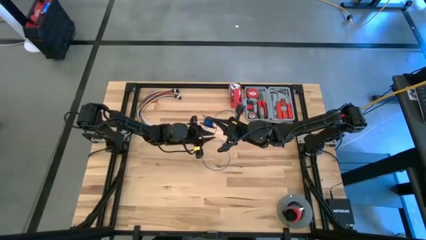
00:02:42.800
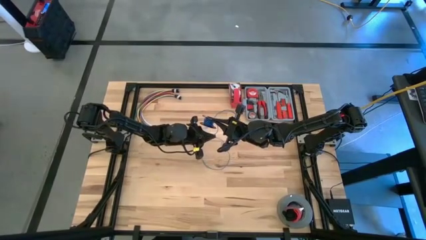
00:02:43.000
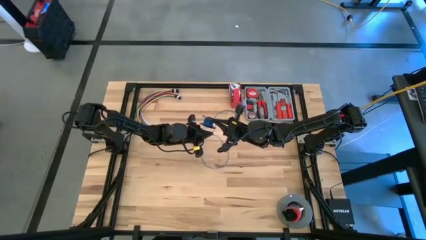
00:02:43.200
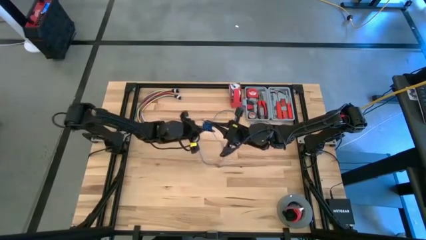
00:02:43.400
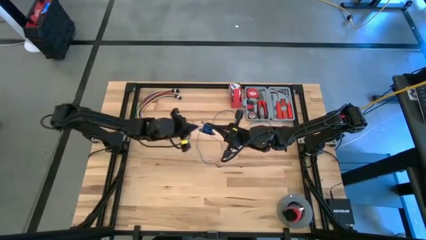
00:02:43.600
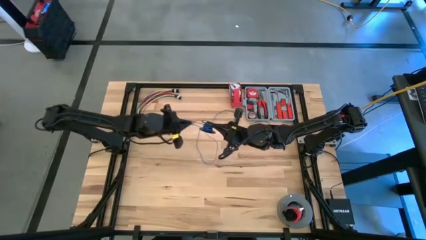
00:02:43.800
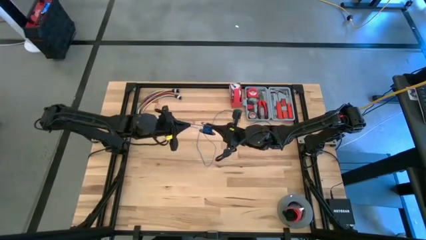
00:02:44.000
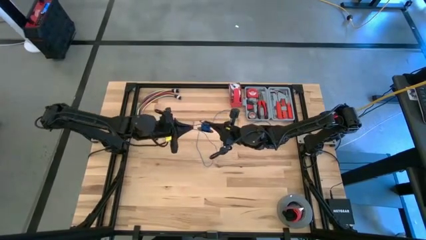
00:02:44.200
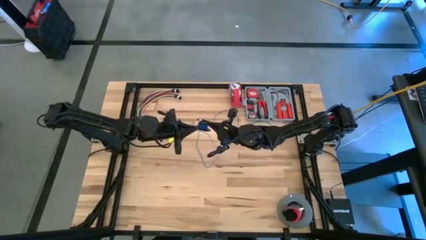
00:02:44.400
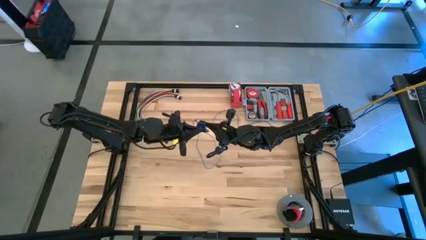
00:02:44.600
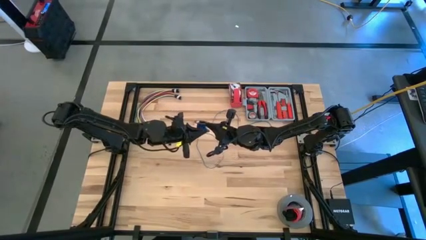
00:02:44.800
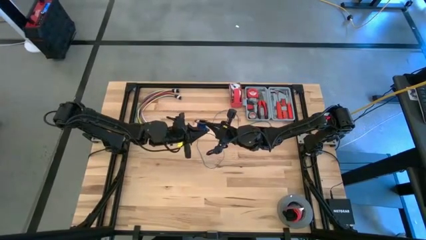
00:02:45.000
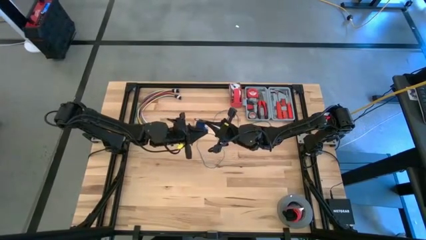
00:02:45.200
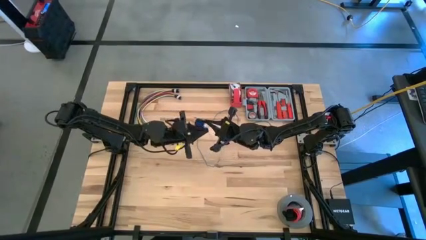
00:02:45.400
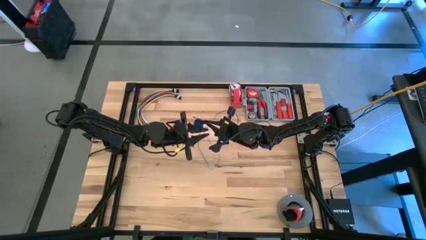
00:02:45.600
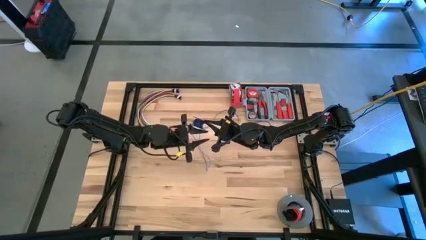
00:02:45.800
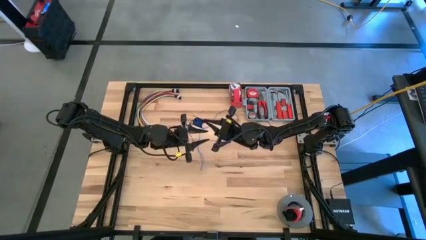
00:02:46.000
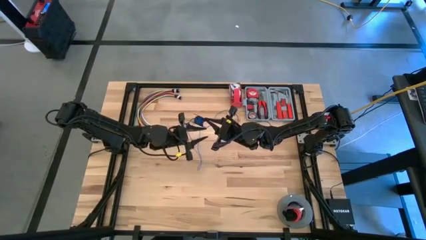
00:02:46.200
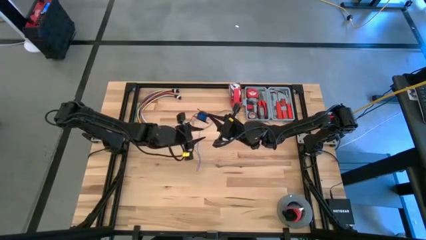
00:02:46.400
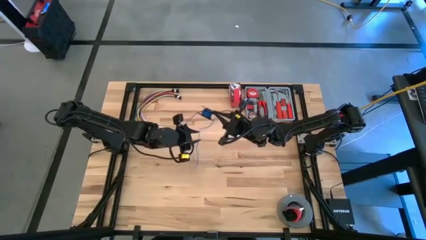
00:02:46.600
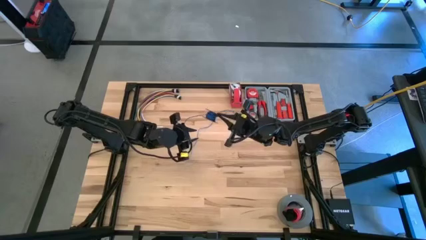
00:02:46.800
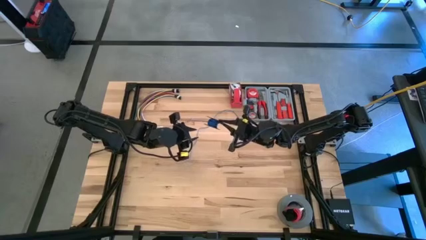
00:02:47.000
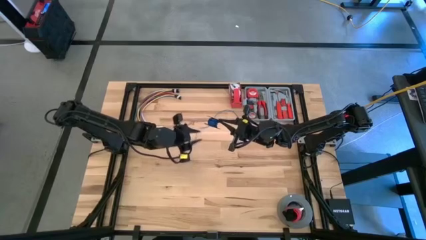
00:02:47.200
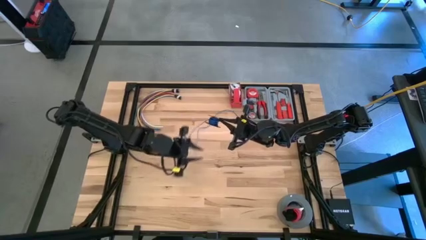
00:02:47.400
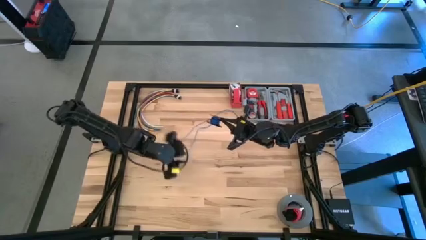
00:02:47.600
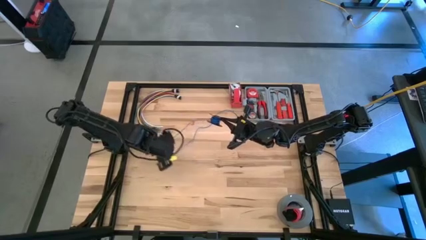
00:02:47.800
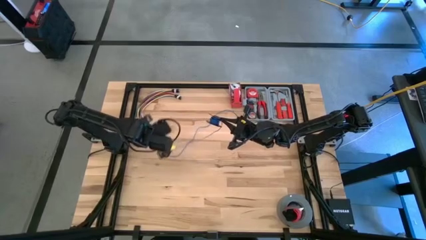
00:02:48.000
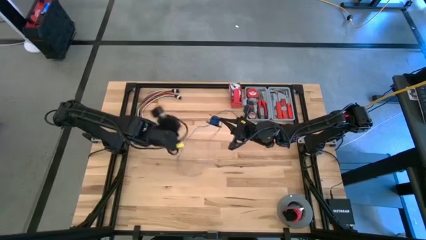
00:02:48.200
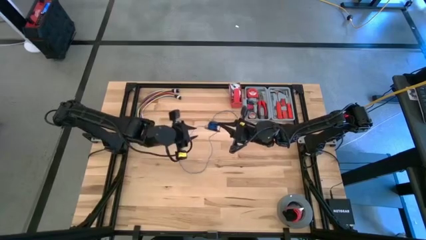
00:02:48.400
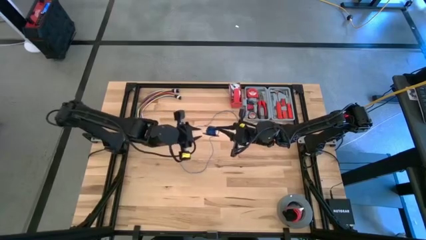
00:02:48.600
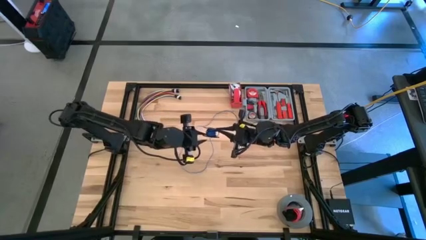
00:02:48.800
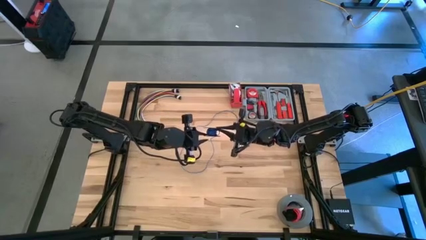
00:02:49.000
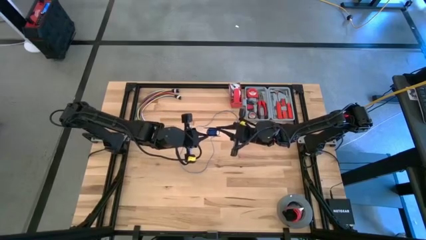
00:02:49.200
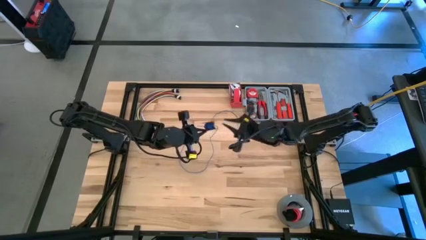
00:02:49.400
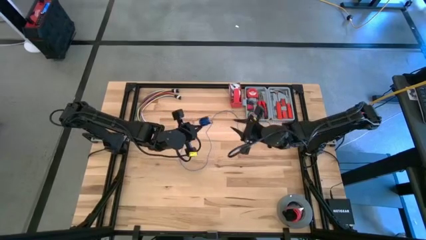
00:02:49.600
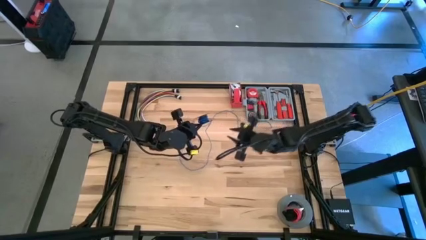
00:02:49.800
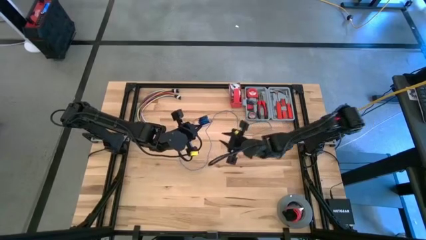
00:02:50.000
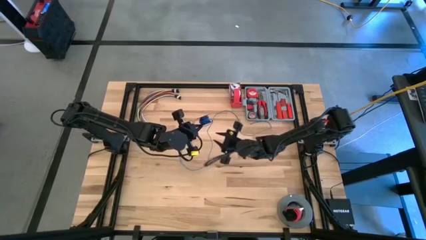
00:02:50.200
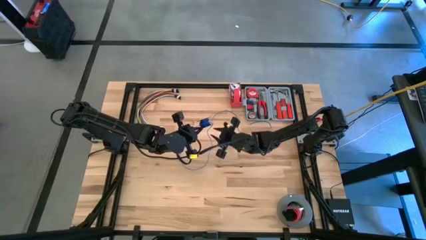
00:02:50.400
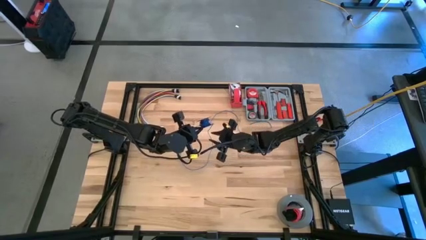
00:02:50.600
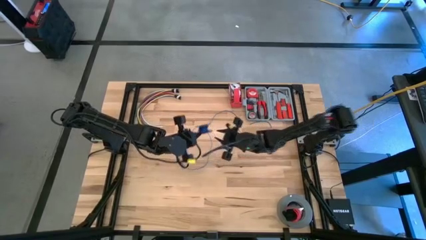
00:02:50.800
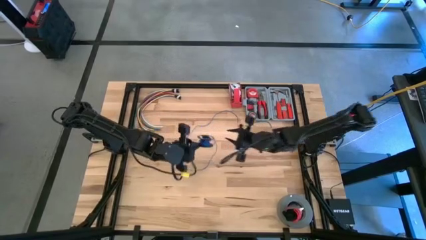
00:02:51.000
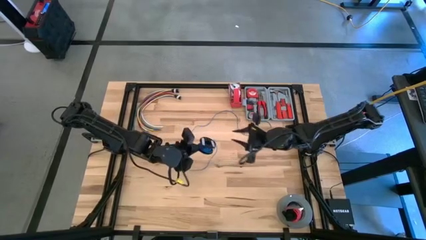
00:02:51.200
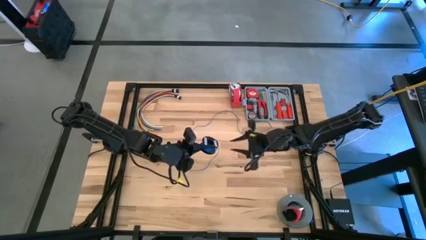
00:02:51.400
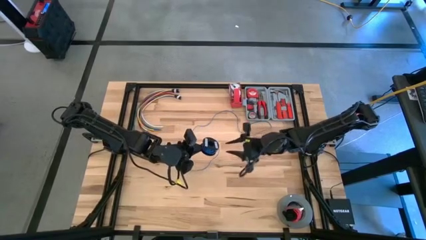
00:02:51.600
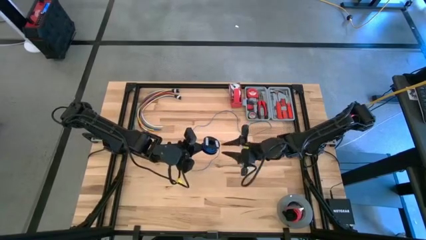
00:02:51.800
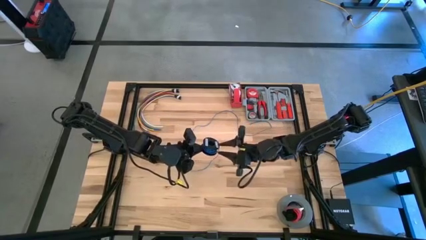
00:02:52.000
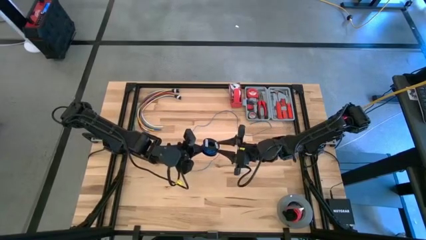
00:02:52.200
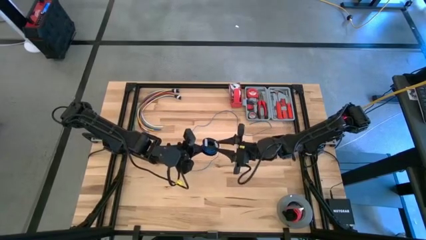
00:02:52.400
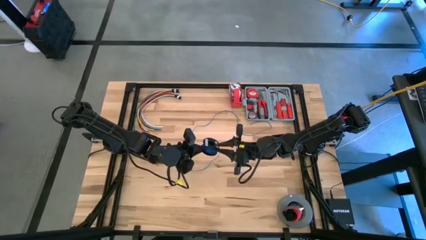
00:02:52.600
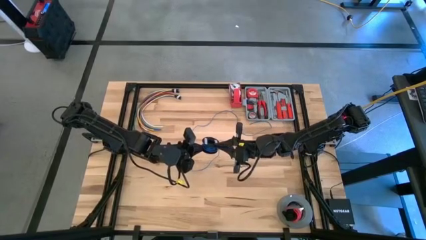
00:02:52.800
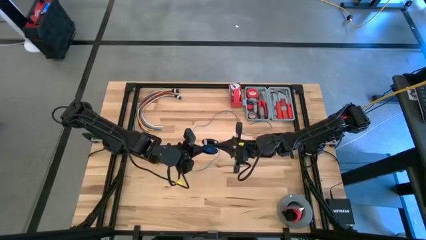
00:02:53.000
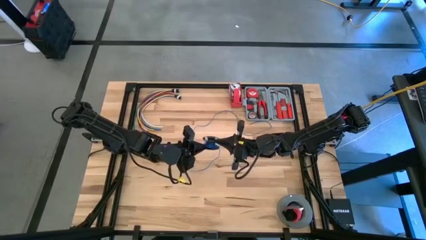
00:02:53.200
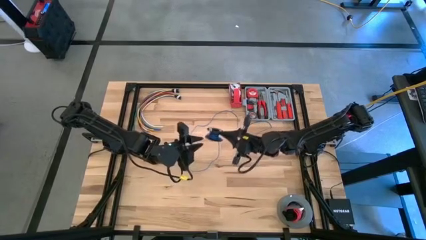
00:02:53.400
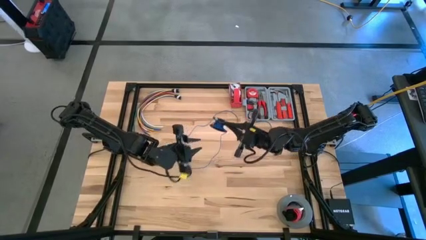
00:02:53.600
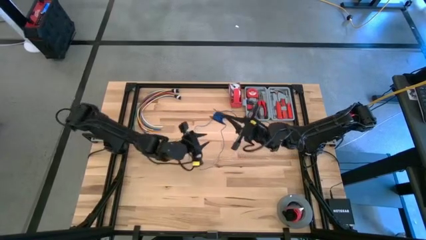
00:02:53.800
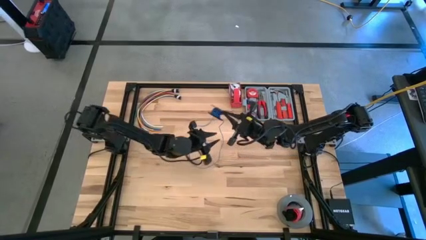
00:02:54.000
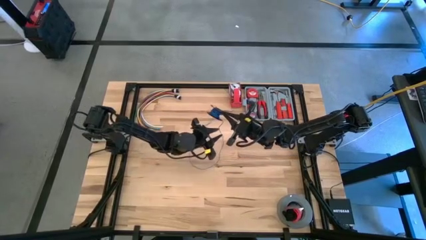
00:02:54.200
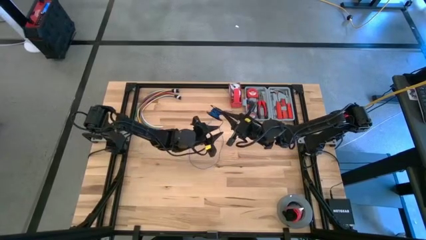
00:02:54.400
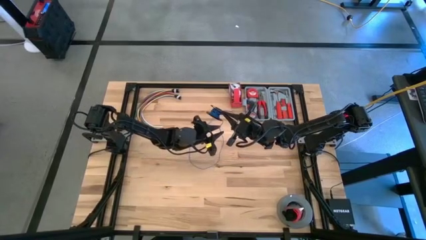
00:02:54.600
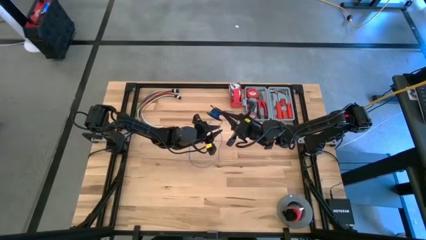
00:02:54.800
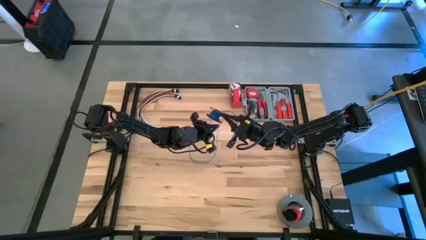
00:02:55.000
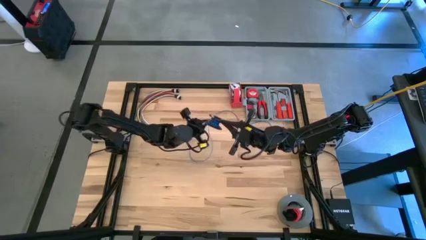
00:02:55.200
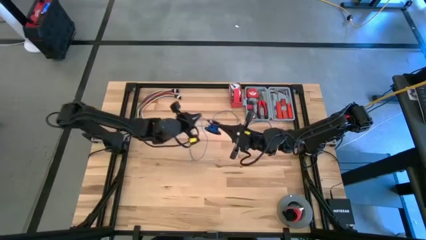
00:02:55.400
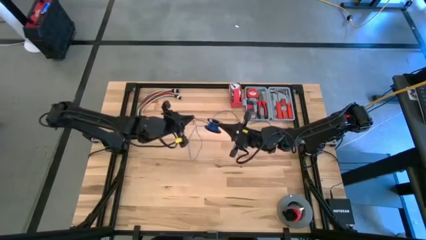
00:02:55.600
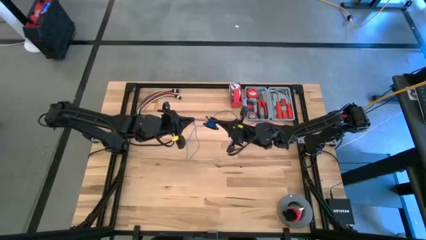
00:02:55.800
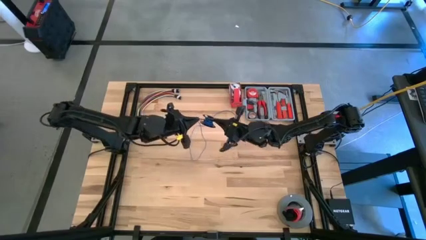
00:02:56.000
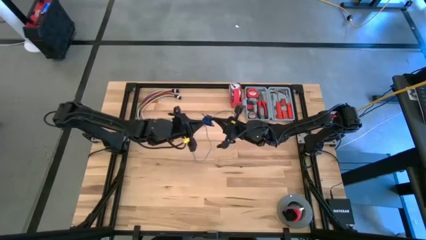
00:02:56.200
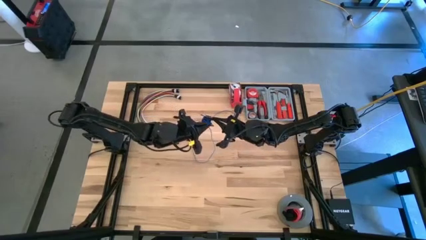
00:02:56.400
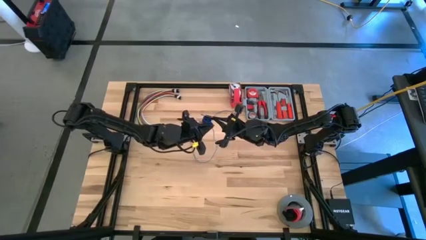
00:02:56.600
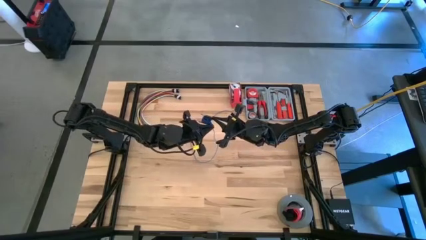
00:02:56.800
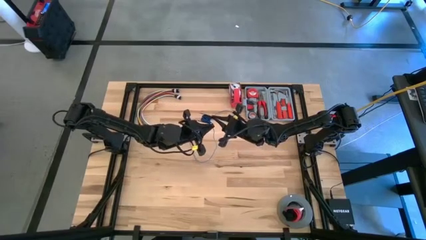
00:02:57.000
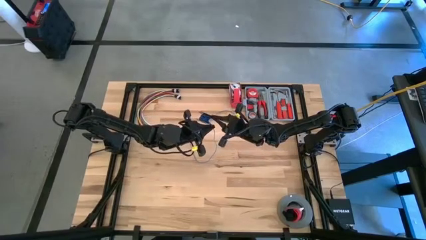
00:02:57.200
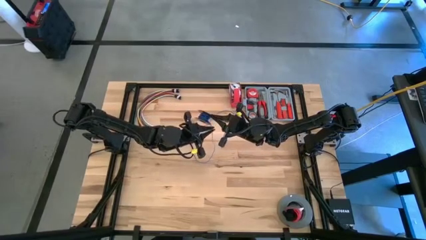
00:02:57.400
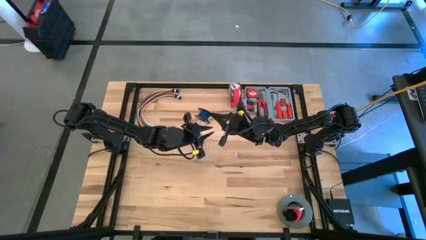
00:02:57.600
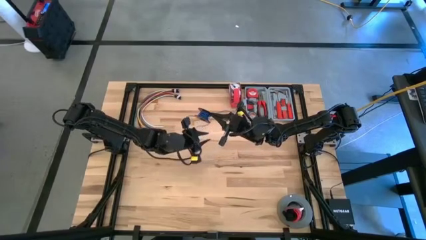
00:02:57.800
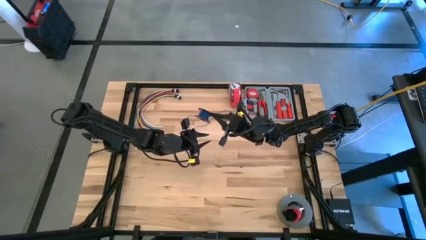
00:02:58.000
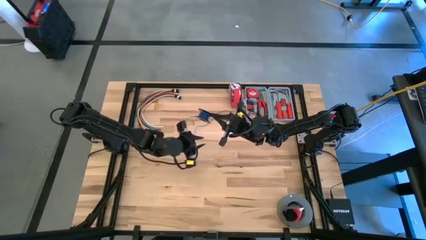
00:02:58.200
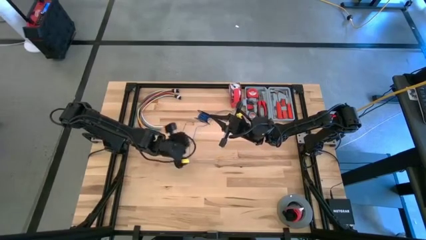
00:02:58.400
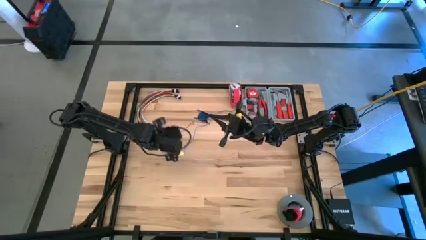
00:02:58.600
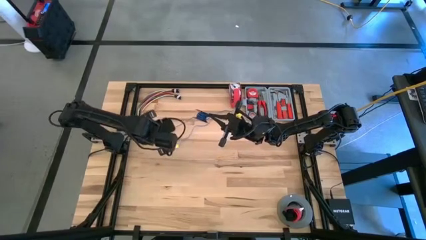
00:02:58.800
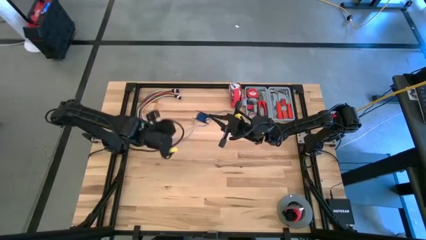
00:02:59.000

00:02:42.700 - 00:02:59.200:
Task: Coil cords
Coil the blue wire on the black spool

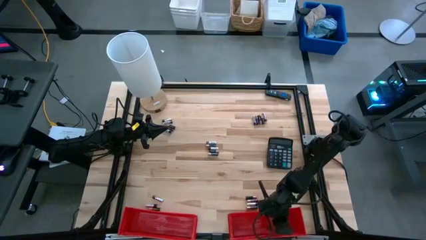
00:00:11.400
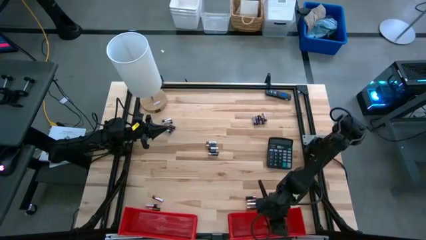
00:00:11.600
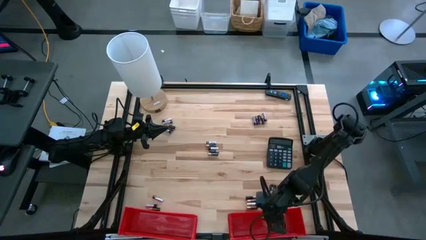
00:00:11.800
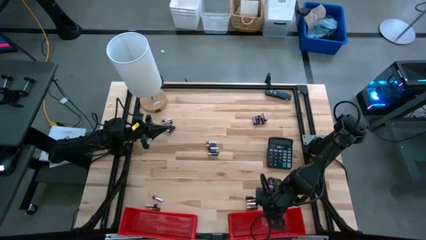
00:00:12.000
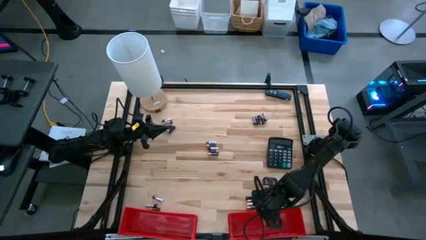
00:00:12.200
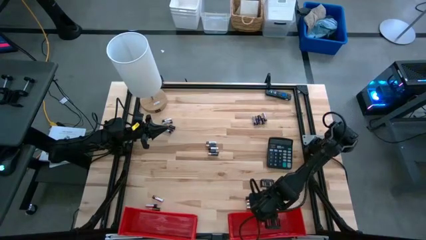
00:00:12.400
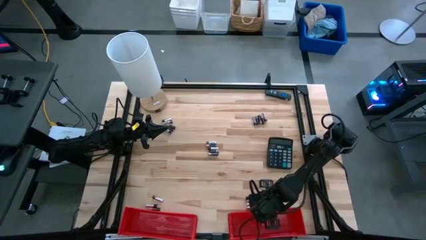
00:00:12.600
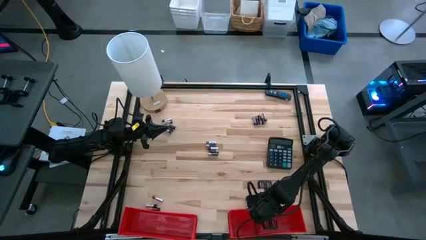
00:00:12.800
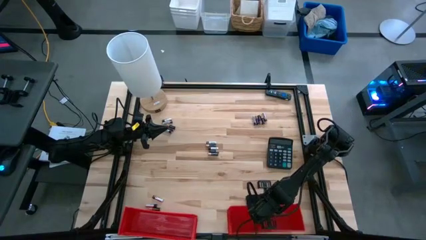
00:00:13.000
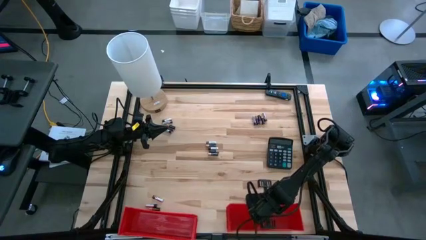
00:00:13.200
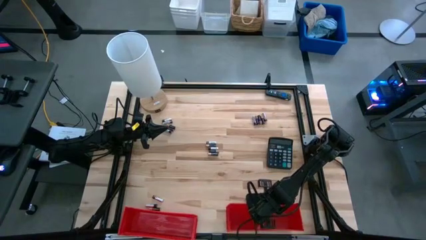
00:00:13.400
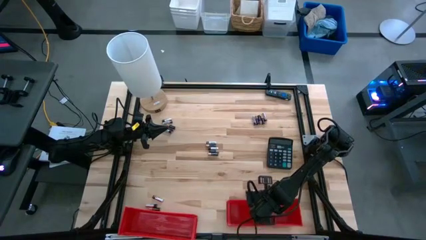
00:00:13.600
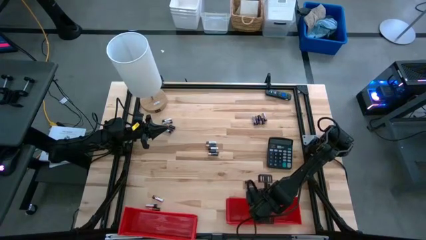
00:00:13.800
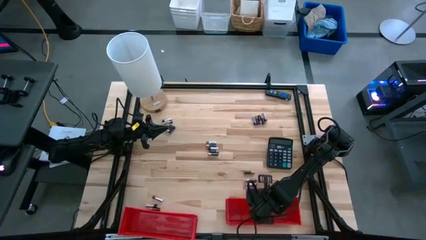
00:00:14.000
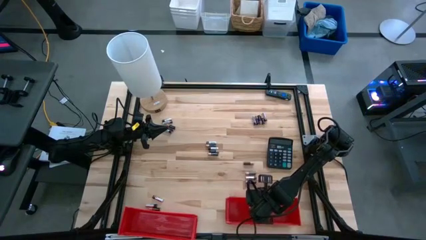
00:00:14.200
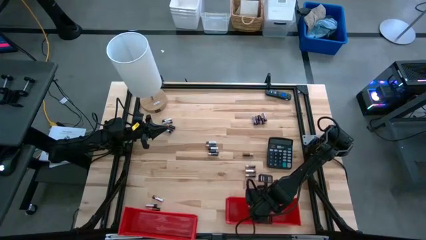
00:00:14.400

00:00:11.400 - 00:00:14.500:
Task: Sort batteries
Adjust the right red bin on the table
